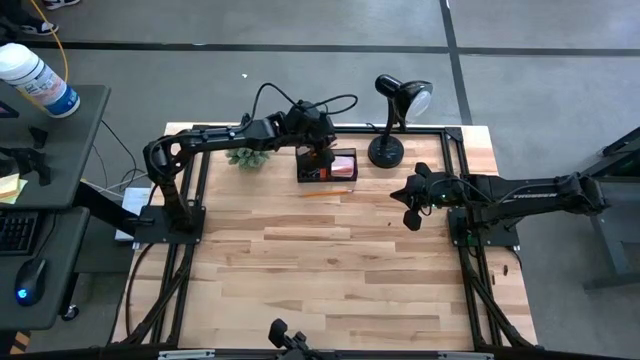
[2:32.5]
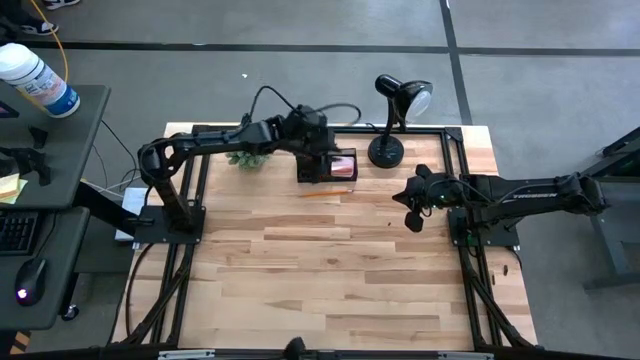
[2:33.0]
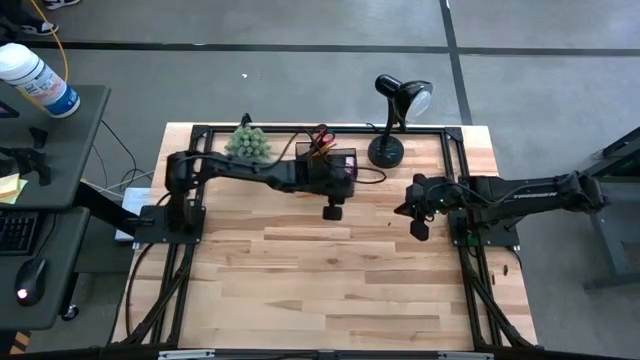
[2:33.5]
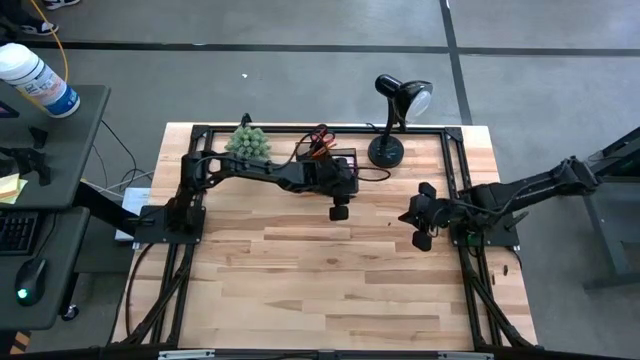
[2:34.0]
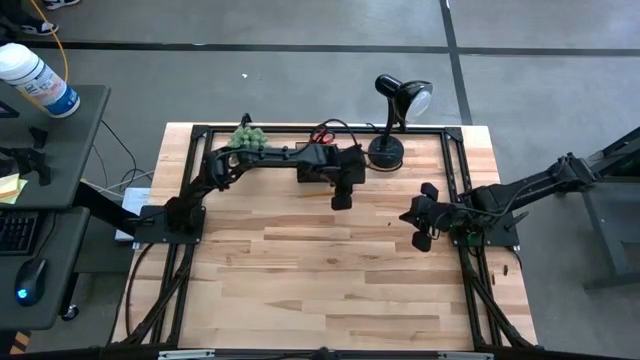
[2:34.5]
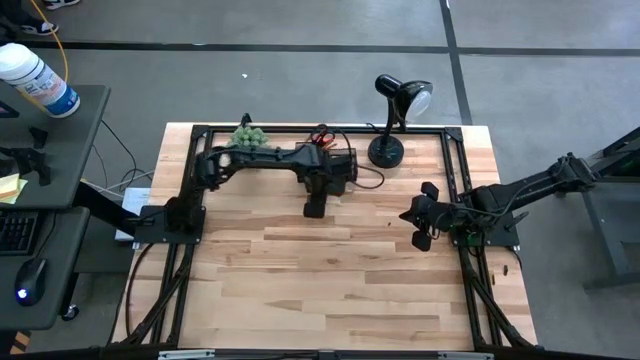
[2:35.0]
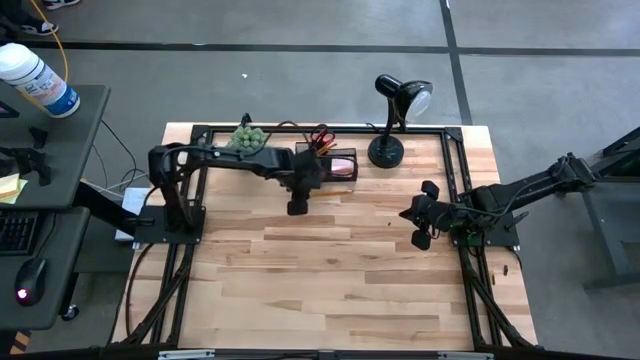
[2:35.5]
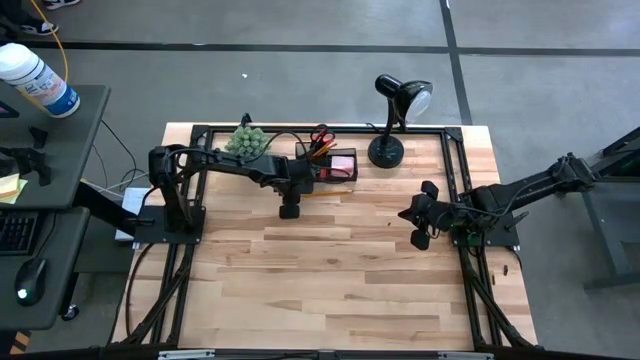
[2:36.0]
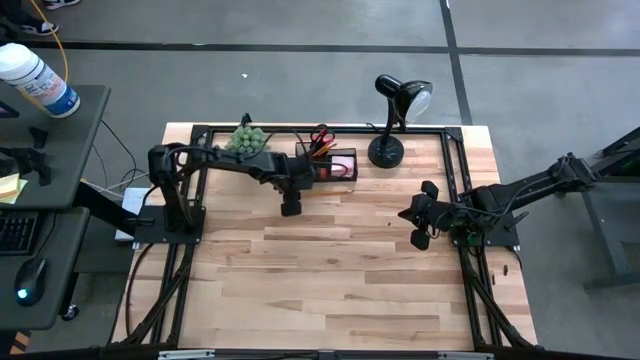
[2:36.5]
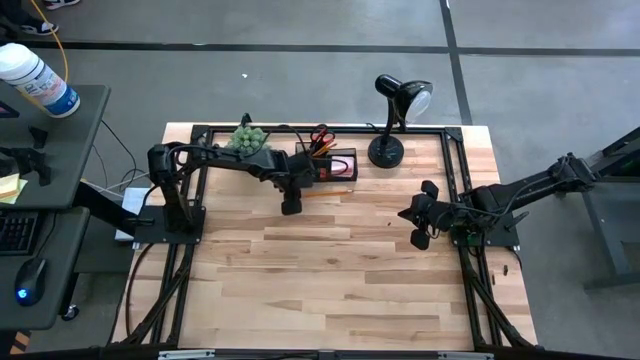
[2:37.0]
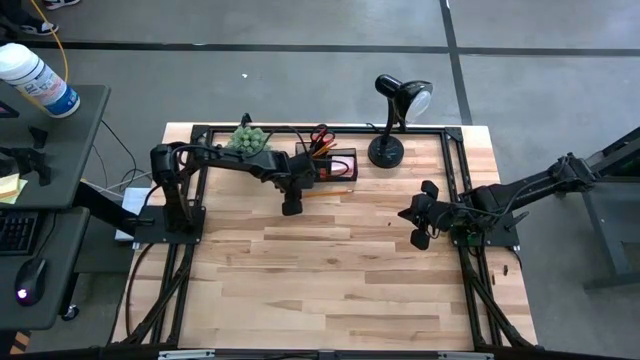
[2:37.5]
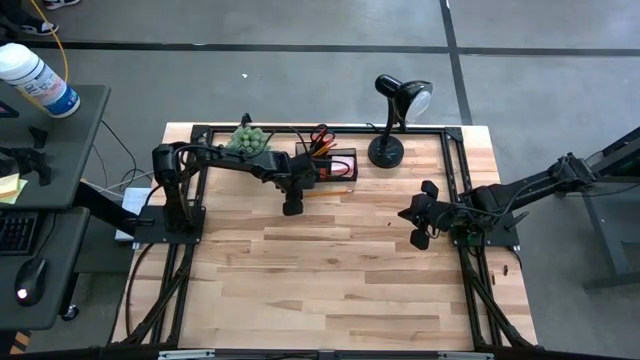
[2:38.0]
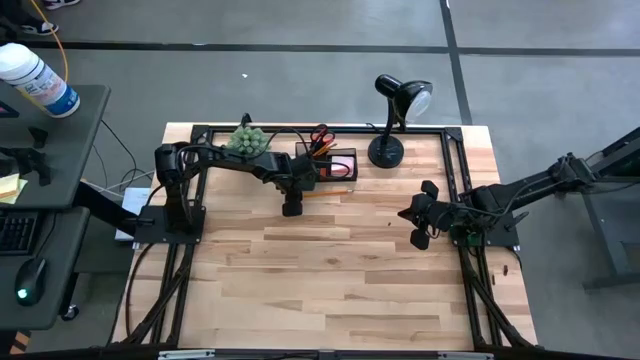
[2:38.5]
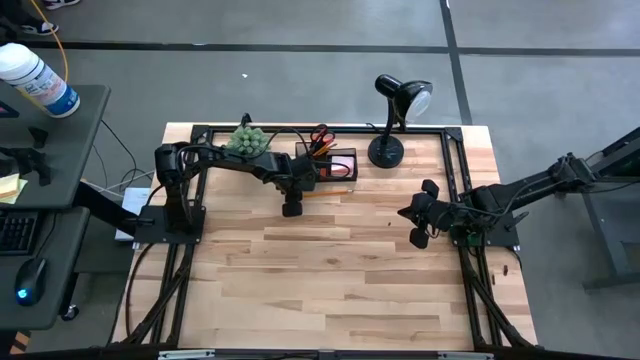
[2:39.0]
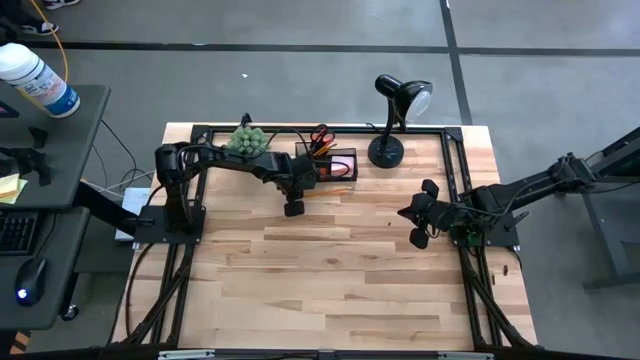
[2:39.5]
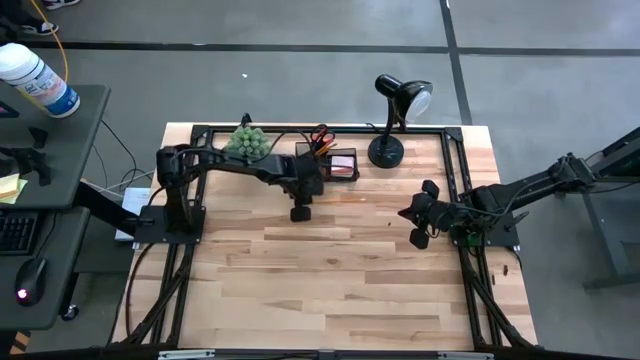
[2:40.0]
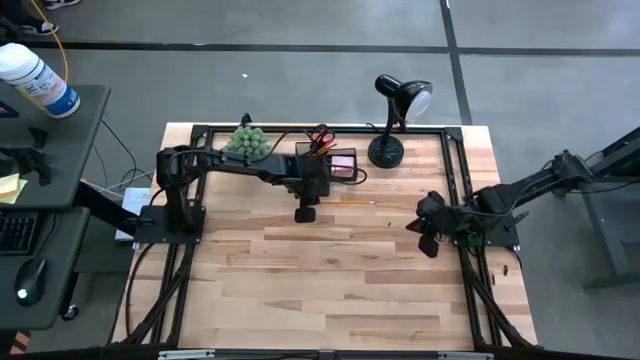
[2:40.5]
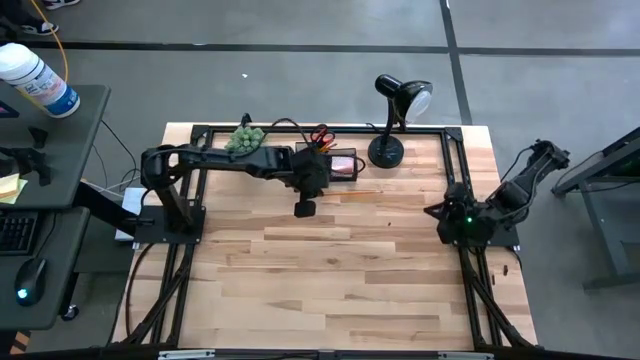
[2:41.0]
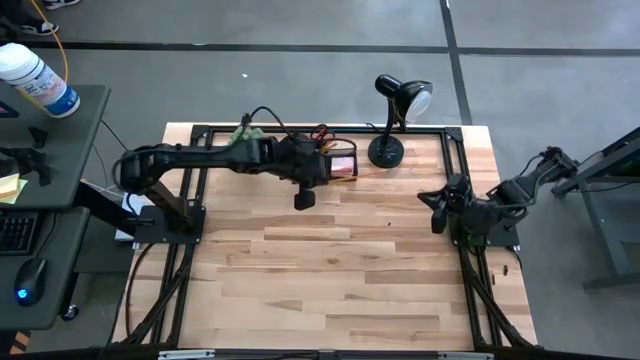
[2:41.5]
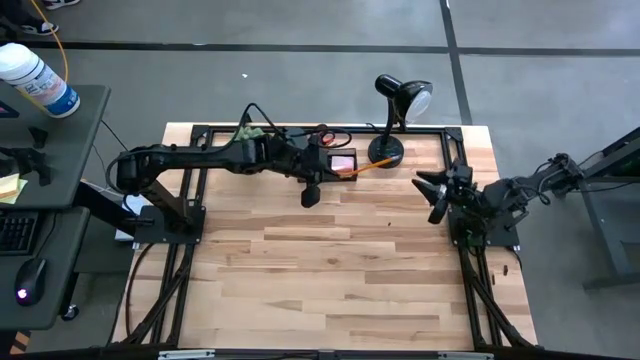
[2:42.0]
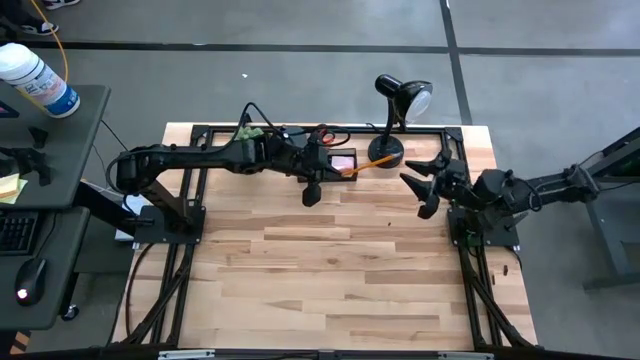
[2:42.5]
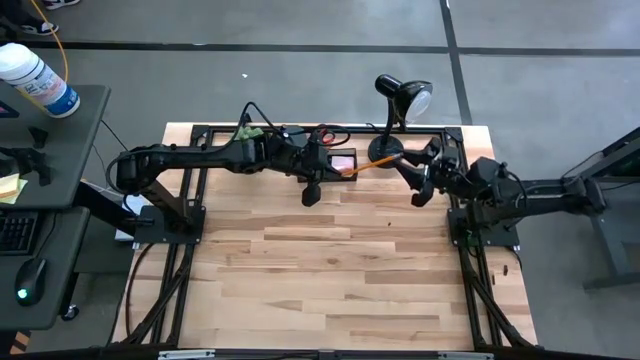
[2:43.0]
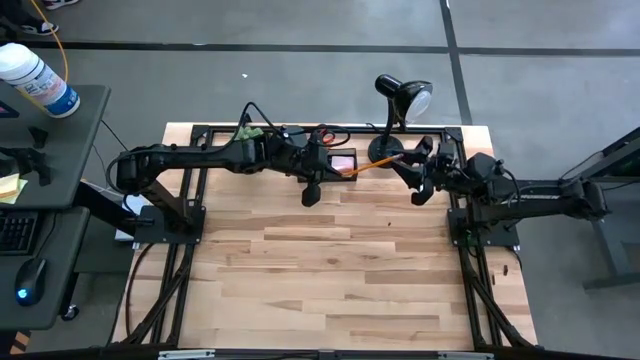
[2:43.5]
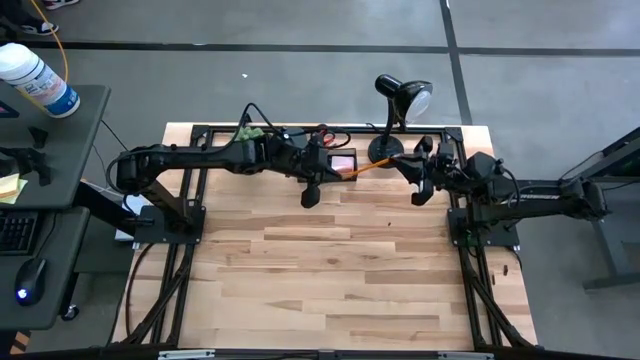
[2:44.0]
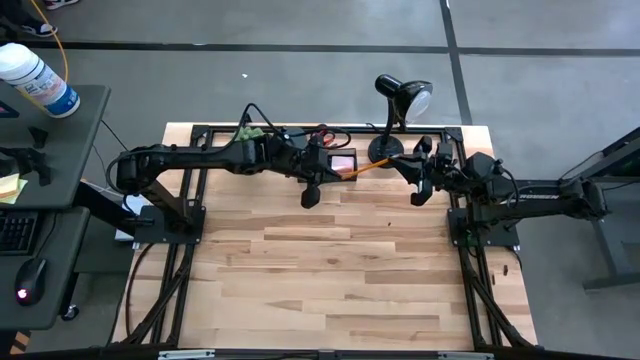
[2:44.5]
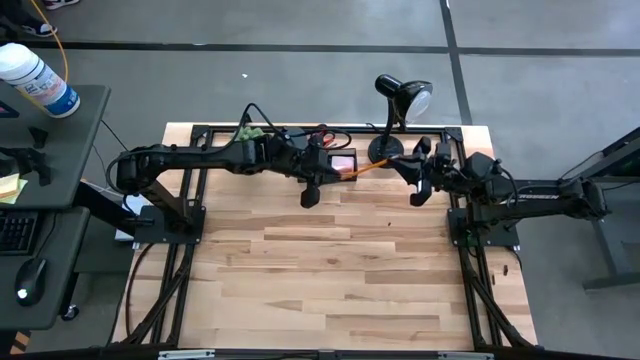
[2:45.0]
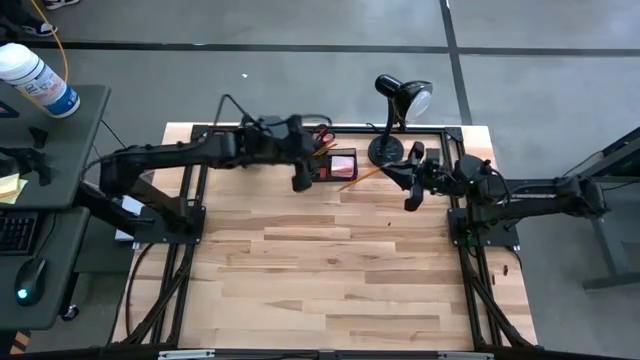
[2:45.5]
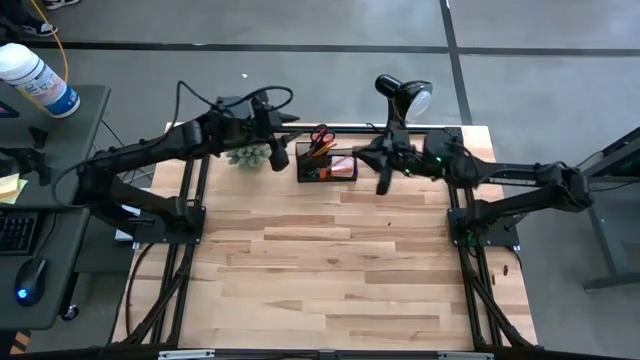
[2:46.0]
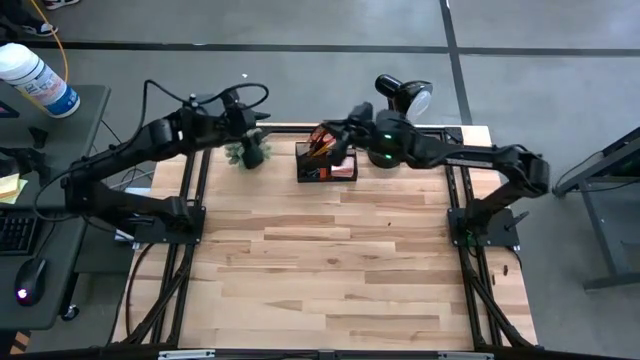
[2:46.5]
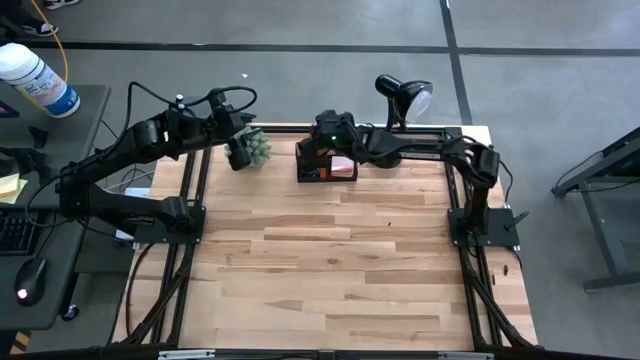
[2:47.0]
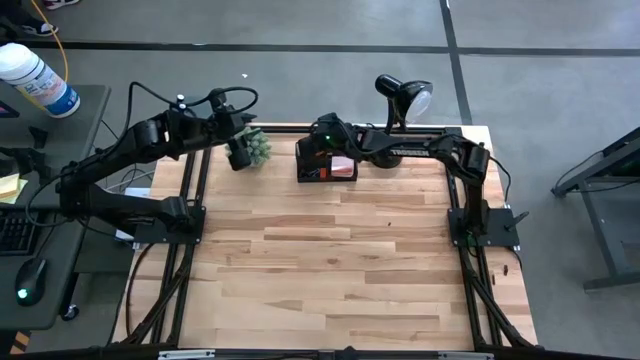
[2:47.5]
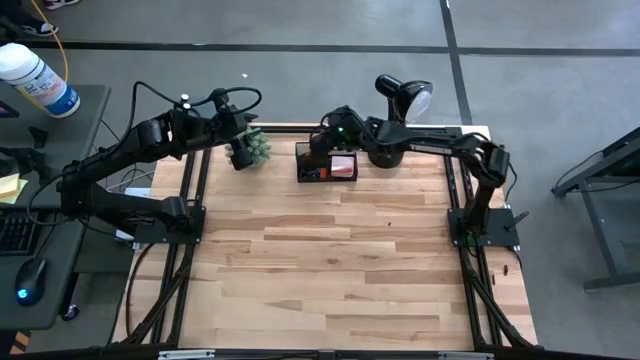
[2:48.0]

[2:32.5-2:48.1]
Task: Pick and place office supplies into organizer
Put the yellow pencil into the black desk organizer

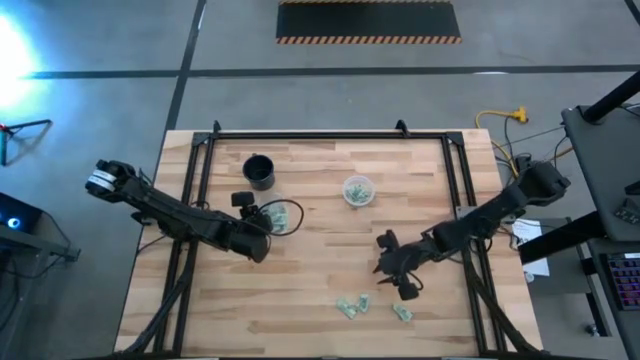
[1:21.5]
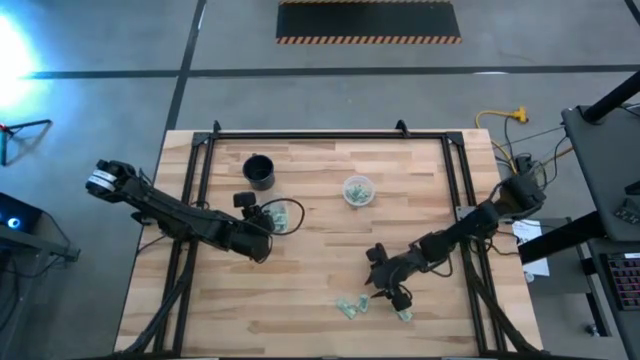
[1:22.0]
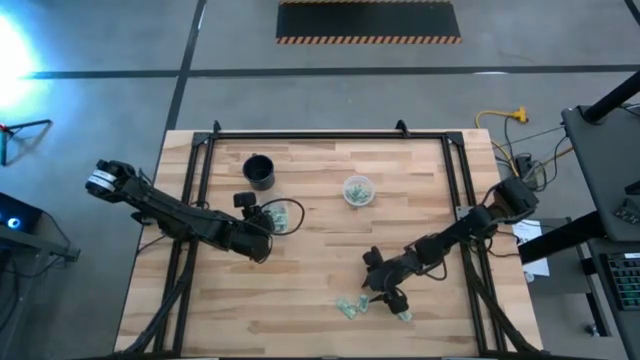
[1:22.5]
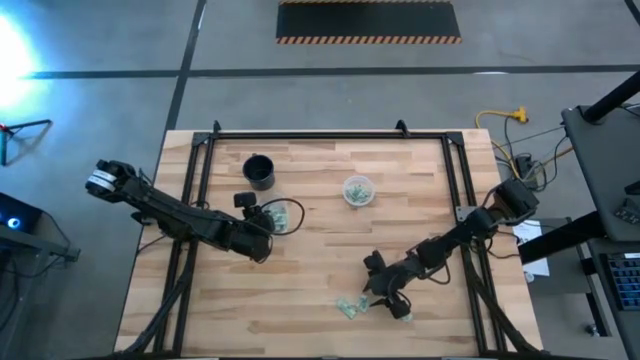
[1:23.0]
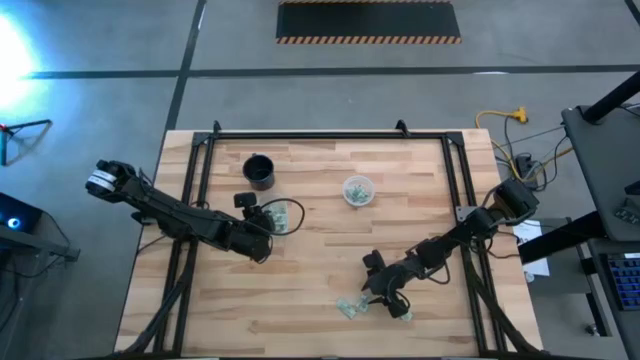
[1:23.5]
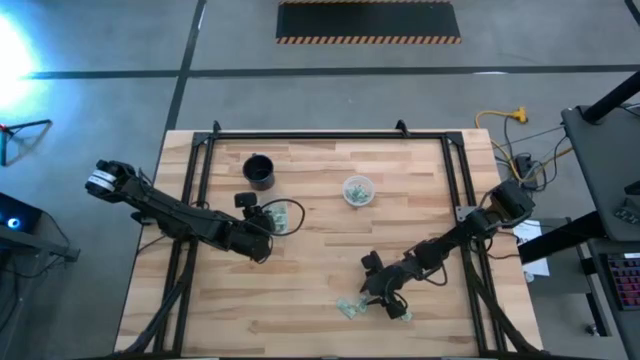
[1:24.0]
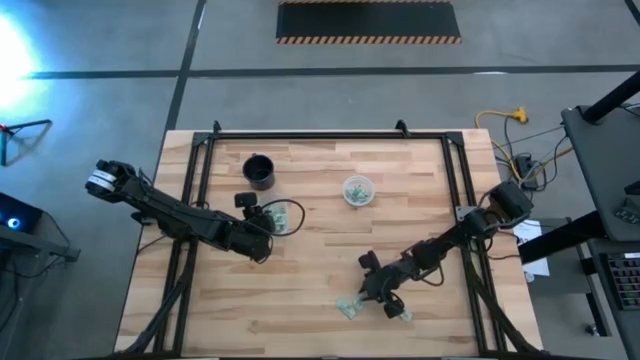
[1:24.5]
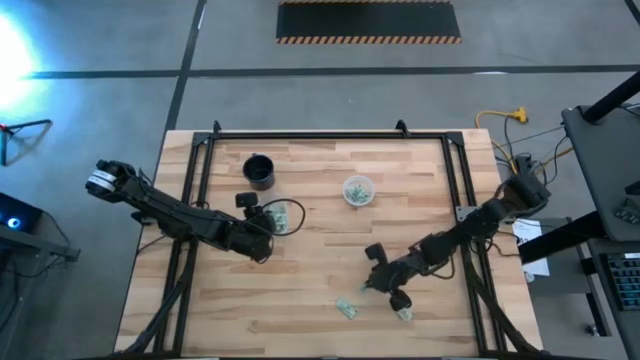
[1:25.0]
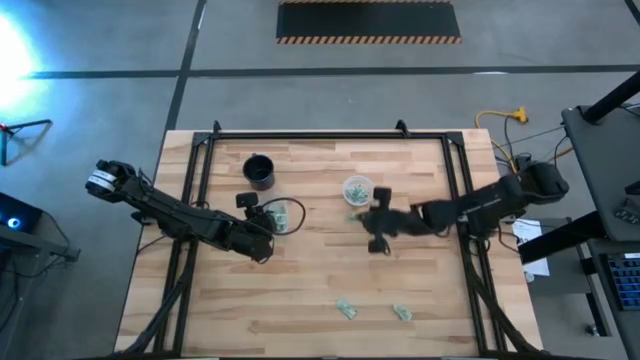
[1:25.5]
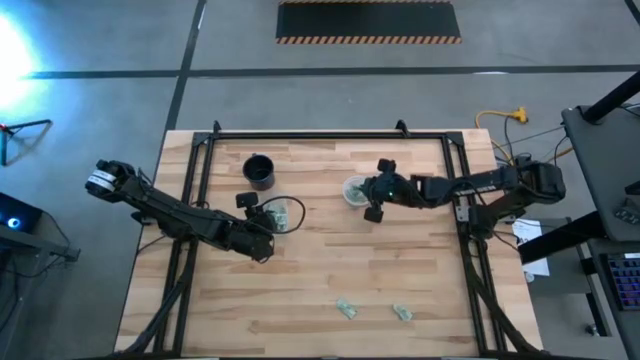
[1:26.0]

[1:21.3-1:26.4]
Task: Pick and place items into bin
Put the stevia packet into the right transparent bin

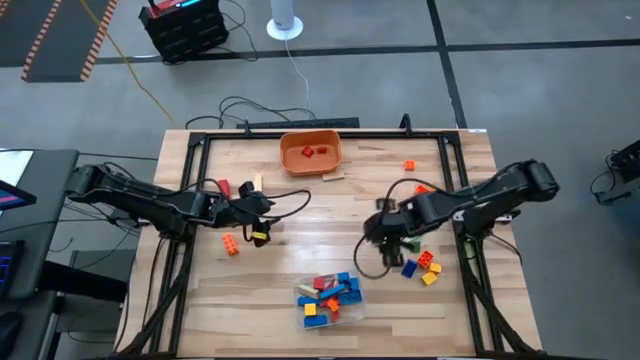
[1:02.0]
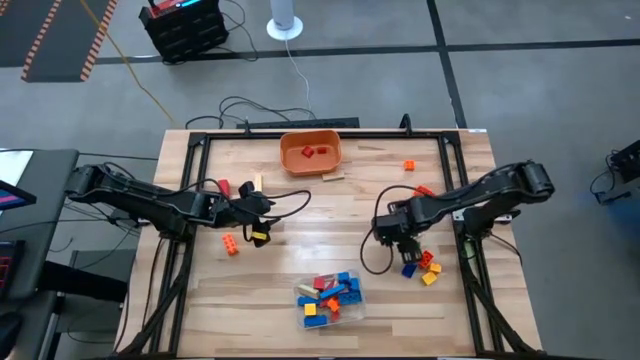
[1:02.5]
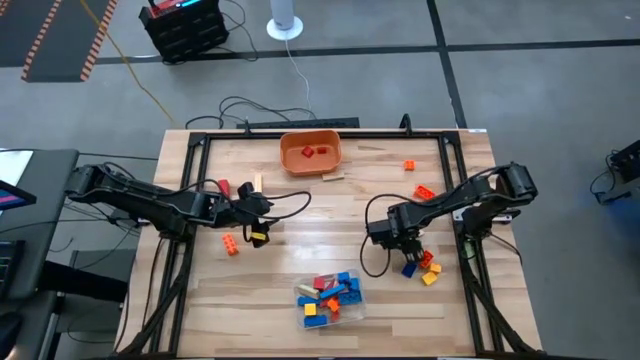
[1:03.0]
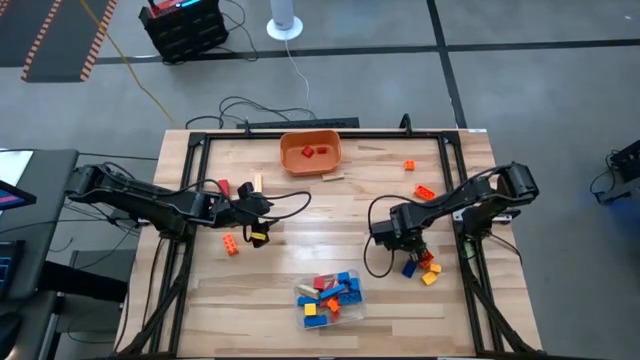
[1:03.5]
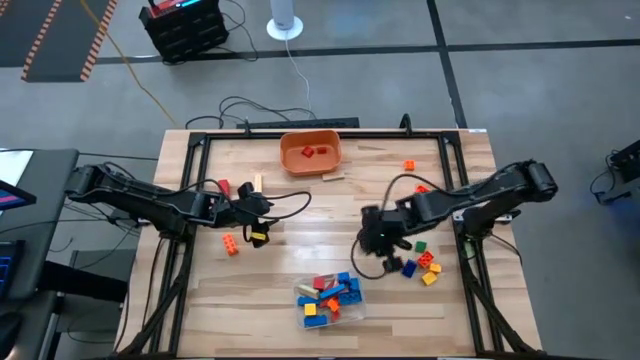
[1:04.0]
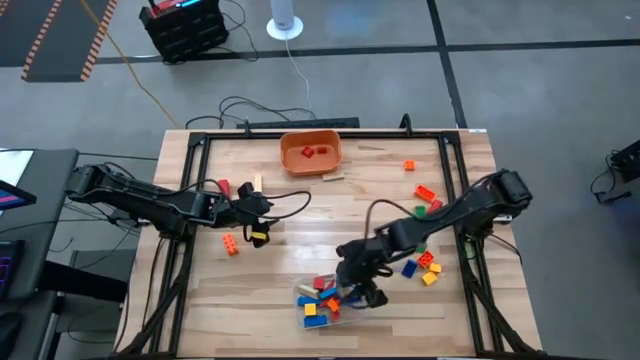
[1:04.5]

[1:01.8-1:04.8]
Task: Sort blocks by size
Put the large brown wooden block into the transparent bin
